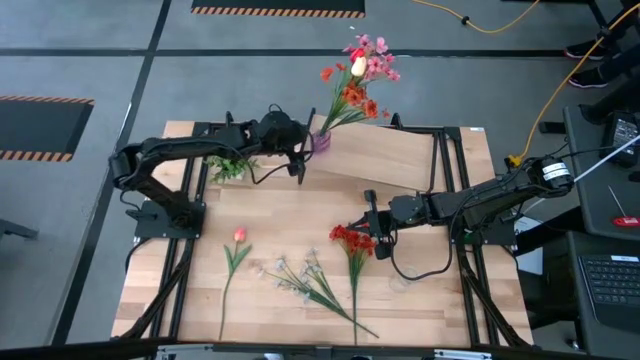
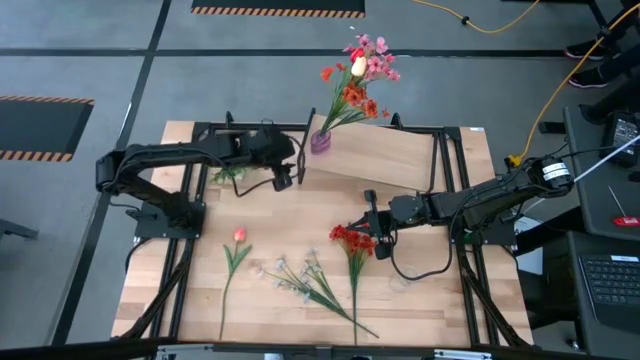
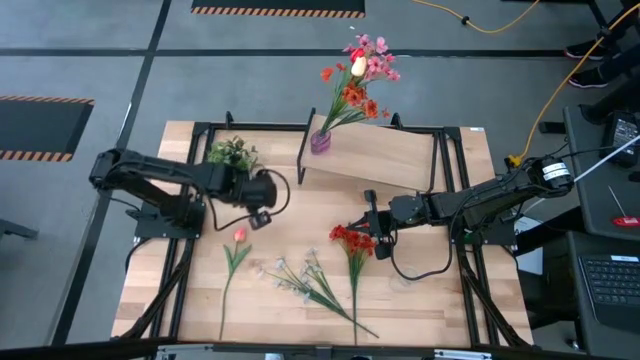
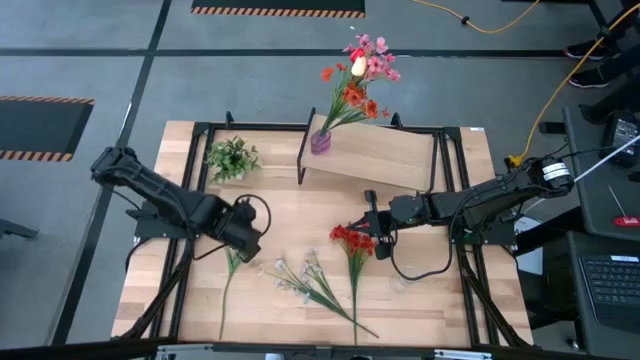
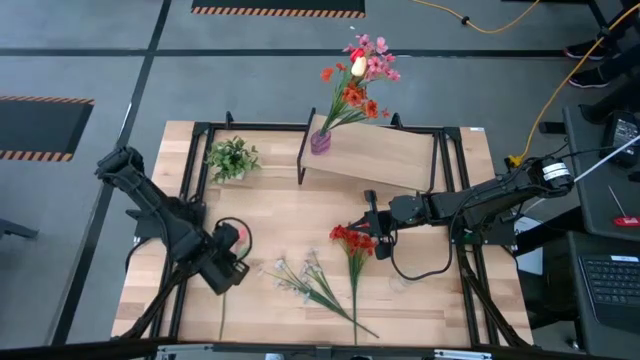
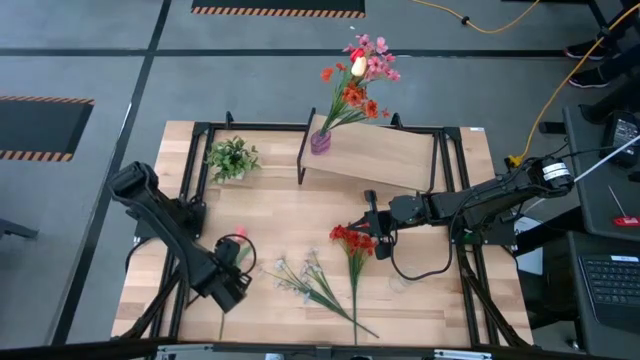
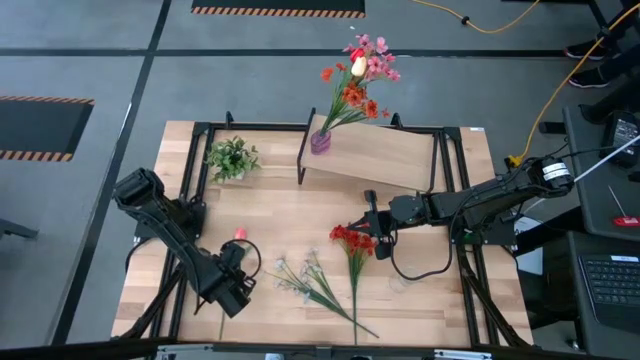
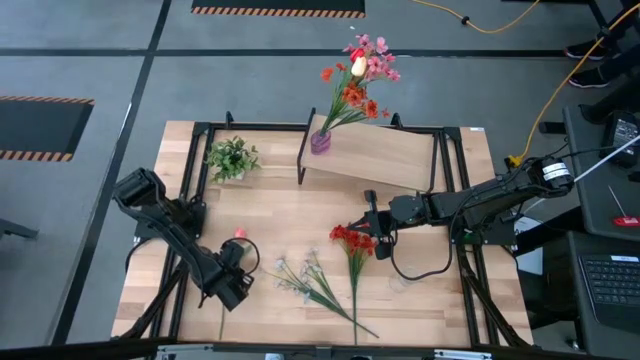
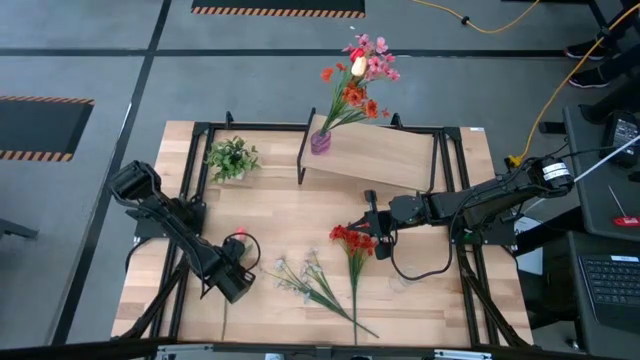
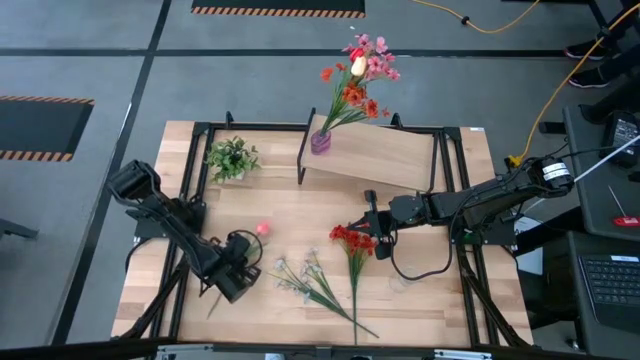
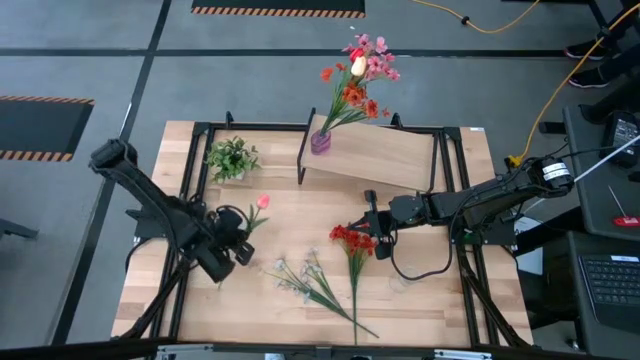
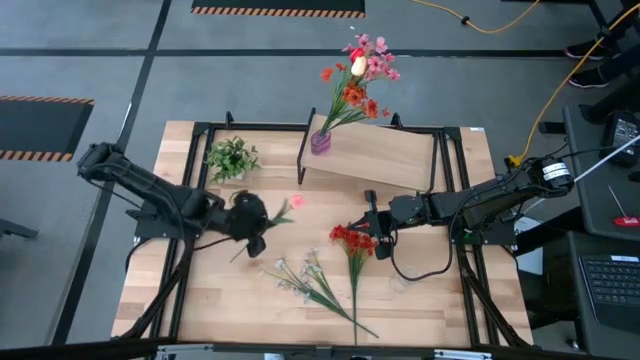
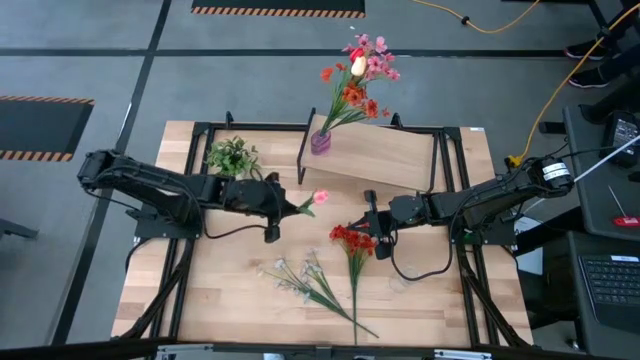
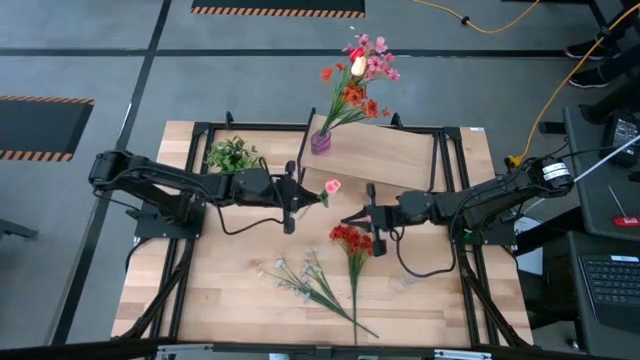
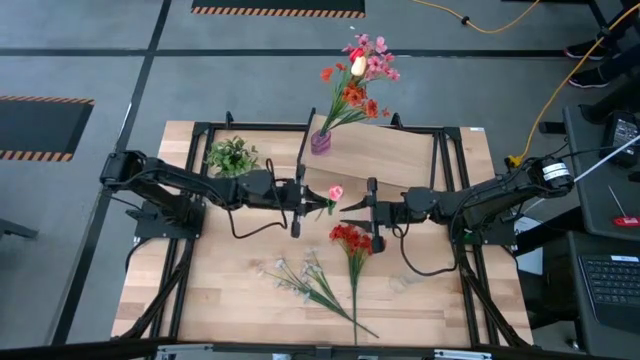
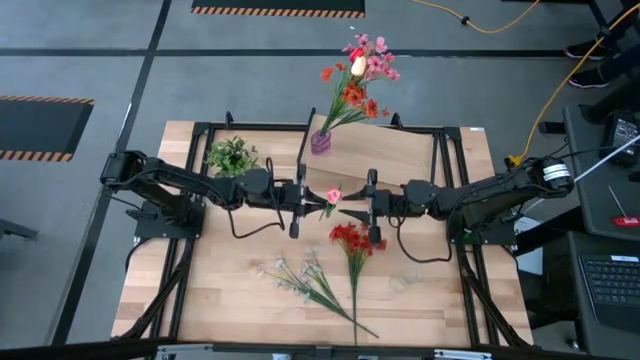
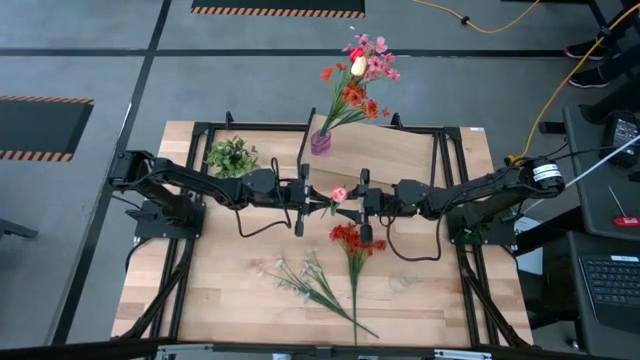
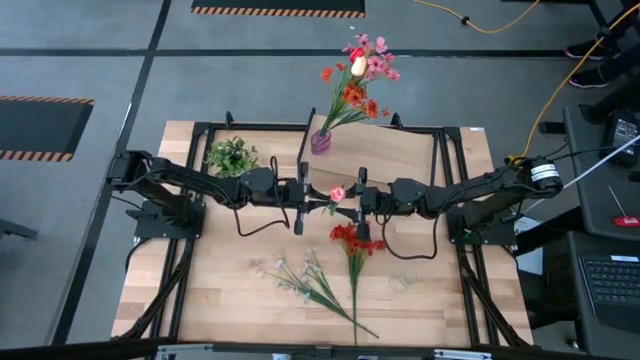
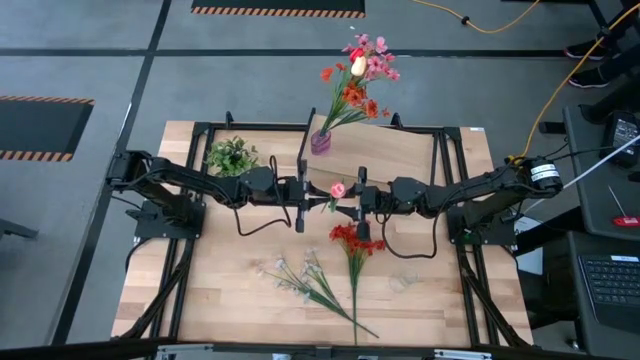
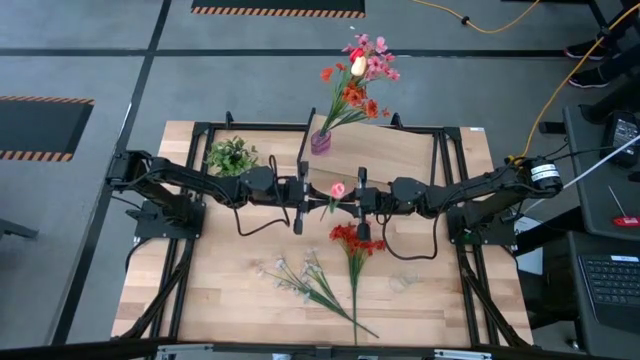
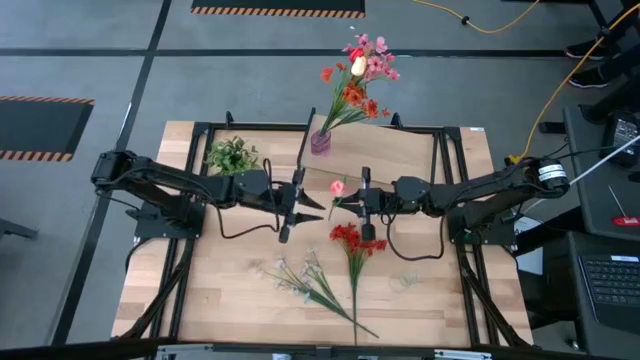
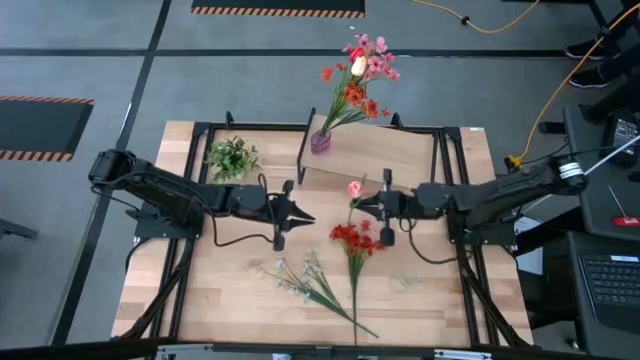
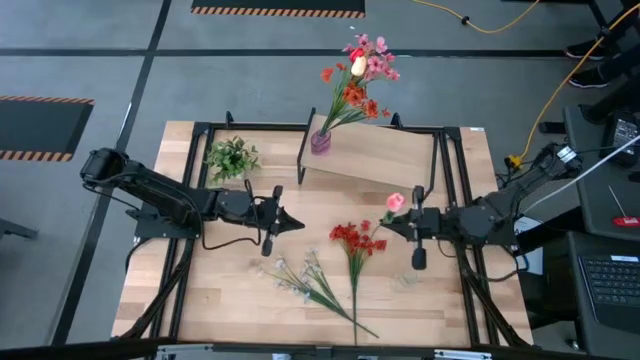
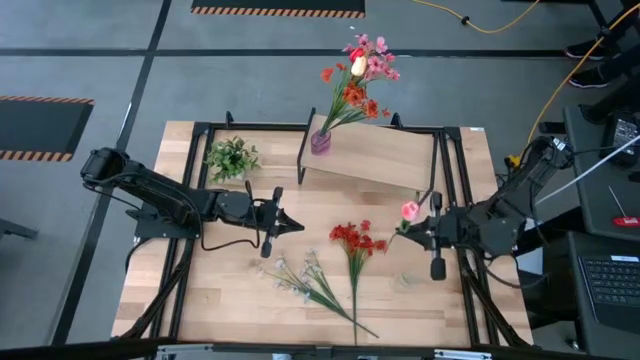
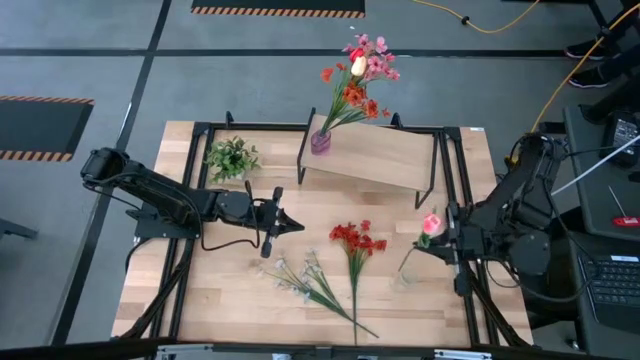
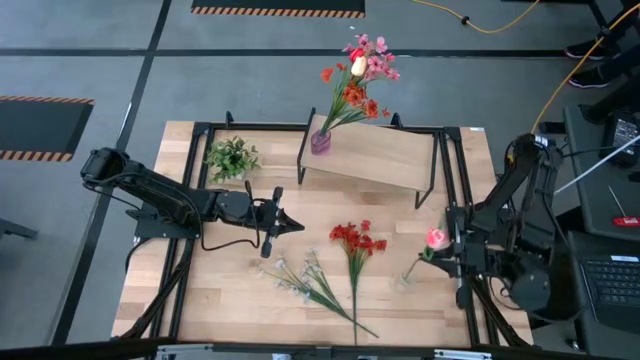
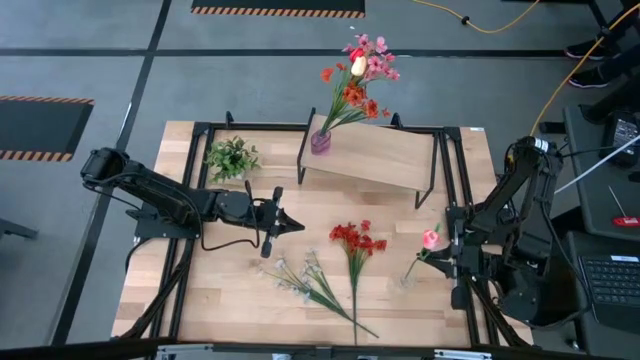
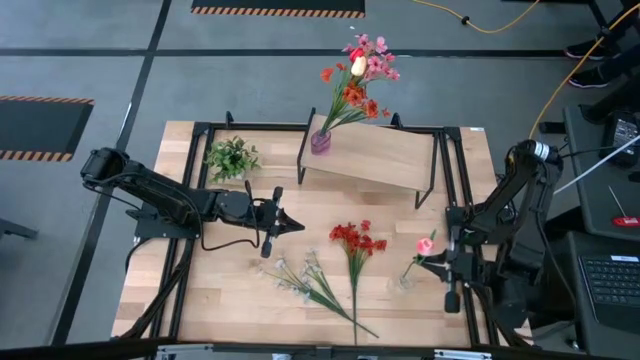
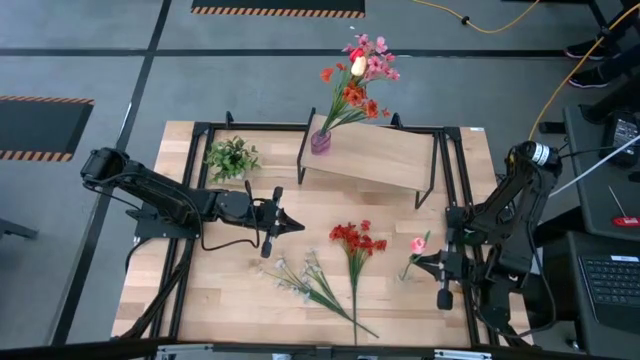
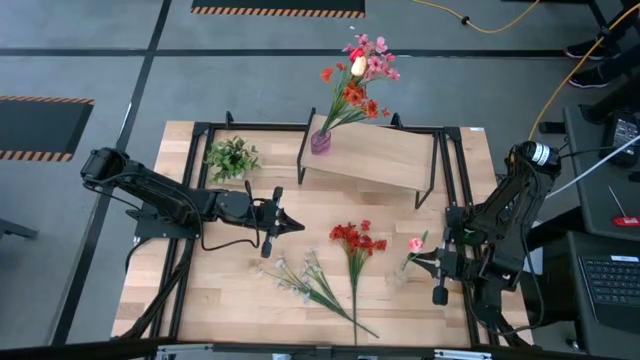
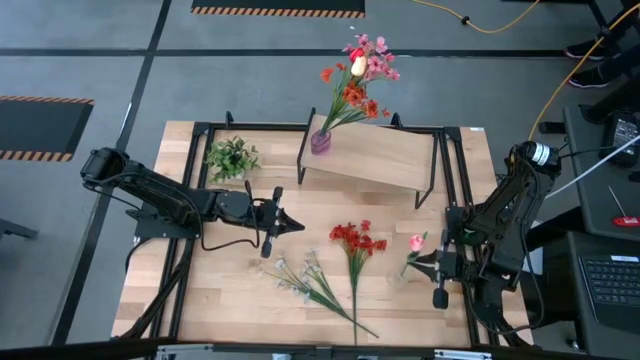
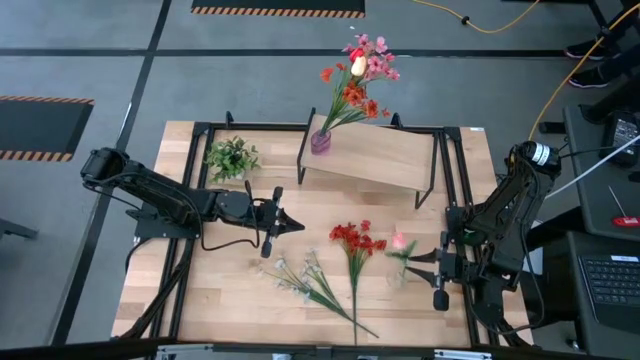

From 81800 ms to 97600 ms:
Task: Pick and place flowers into a vace then onto a shelf
Put the pink flower into the transparent vase
